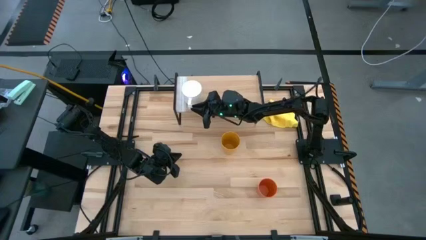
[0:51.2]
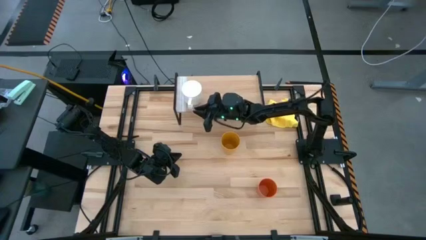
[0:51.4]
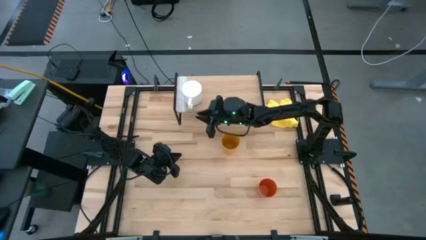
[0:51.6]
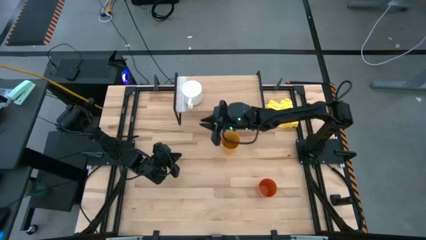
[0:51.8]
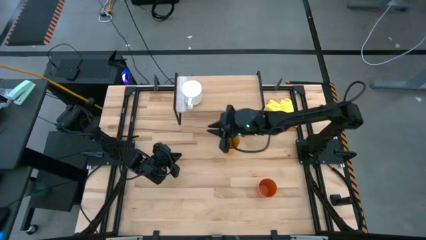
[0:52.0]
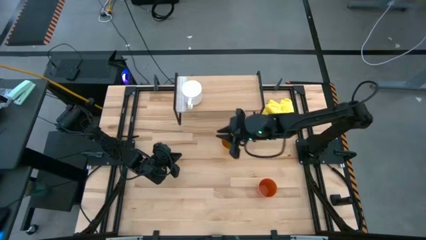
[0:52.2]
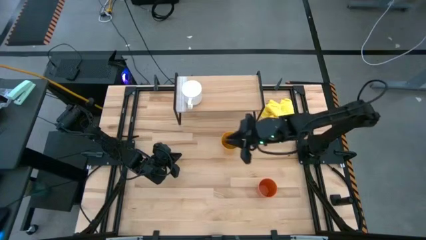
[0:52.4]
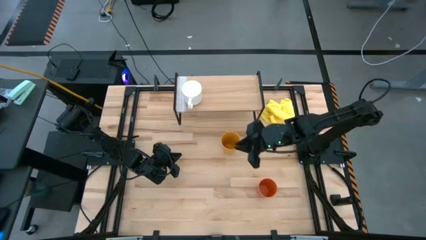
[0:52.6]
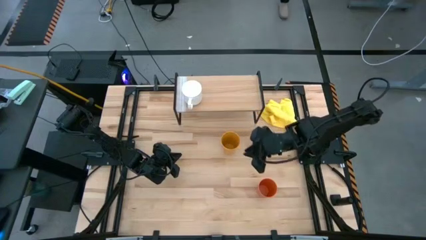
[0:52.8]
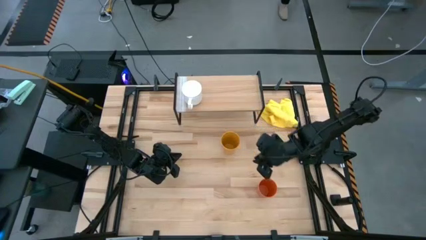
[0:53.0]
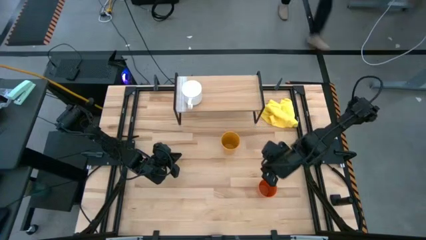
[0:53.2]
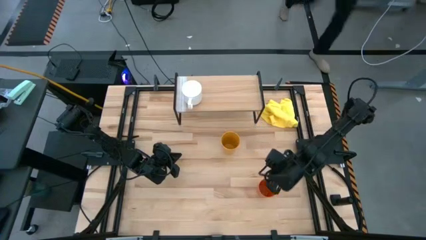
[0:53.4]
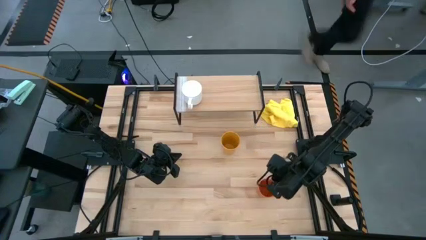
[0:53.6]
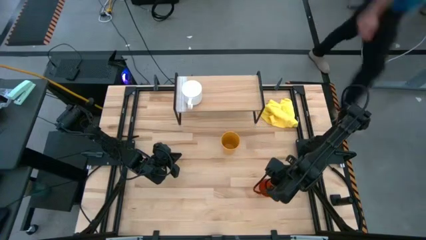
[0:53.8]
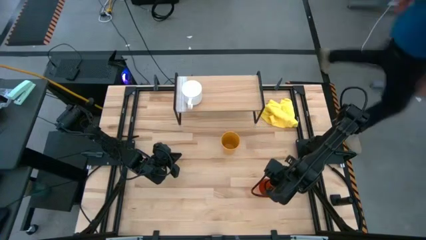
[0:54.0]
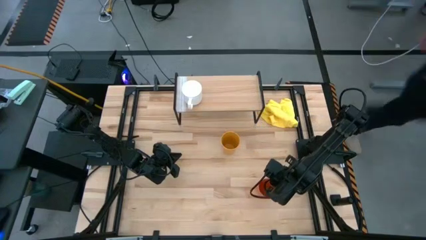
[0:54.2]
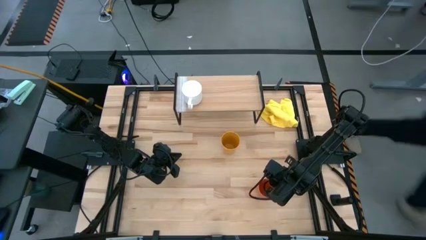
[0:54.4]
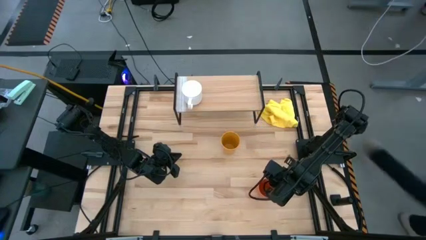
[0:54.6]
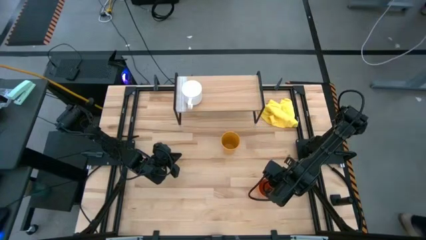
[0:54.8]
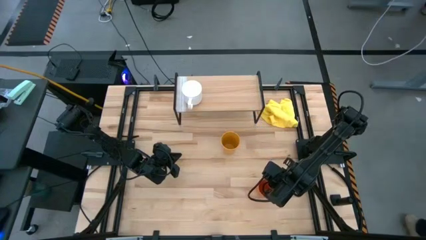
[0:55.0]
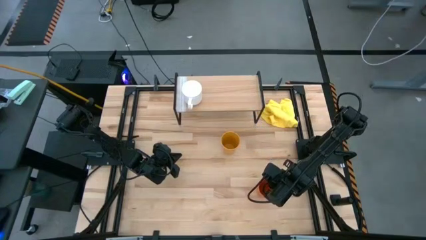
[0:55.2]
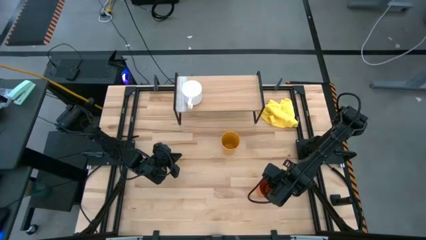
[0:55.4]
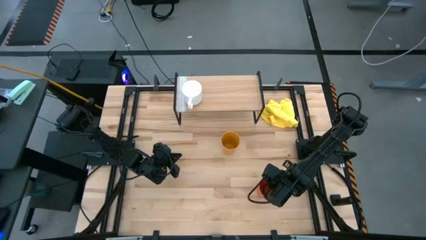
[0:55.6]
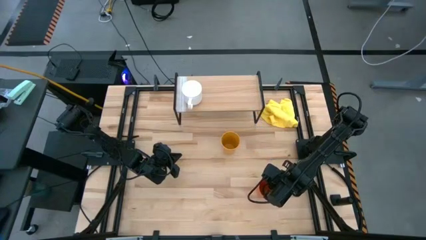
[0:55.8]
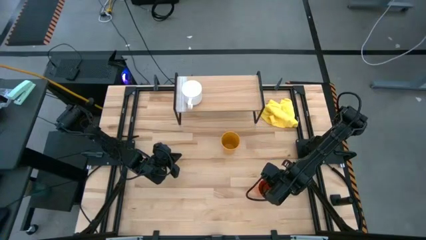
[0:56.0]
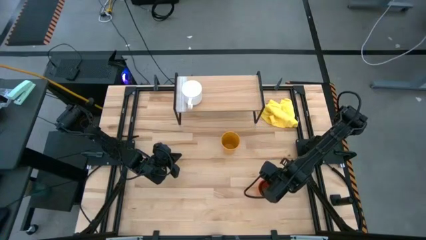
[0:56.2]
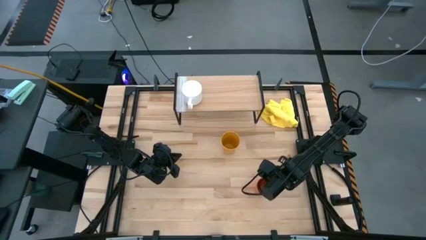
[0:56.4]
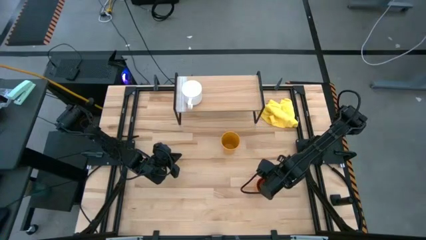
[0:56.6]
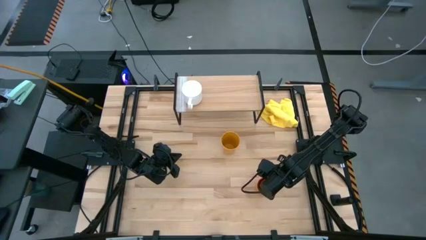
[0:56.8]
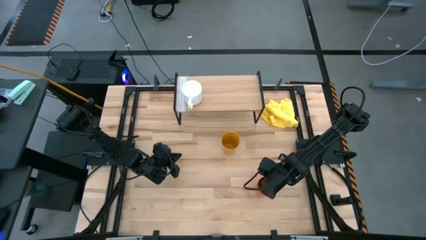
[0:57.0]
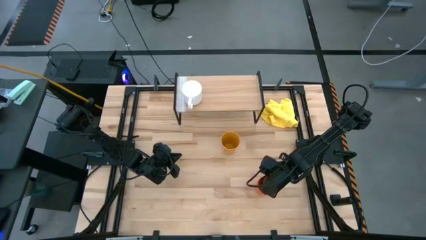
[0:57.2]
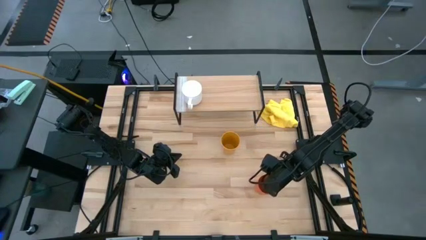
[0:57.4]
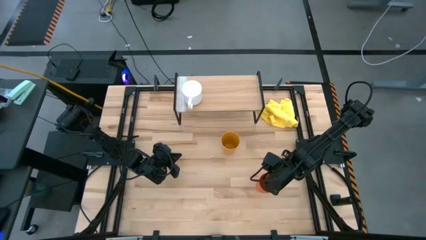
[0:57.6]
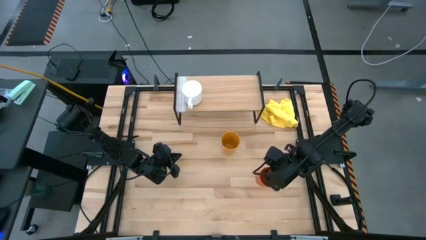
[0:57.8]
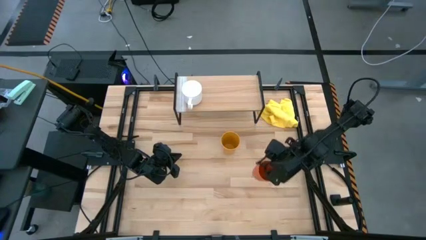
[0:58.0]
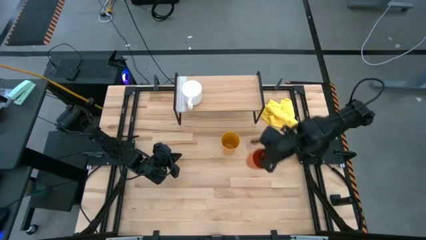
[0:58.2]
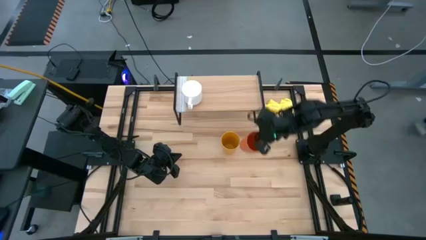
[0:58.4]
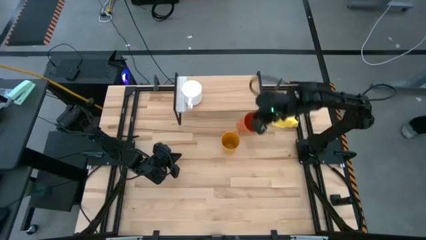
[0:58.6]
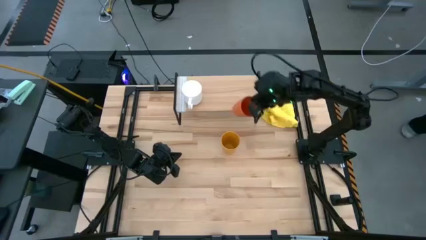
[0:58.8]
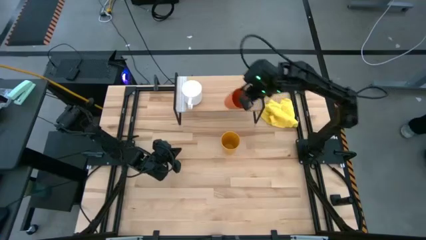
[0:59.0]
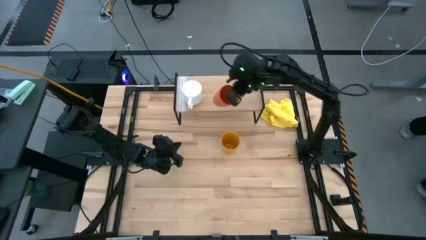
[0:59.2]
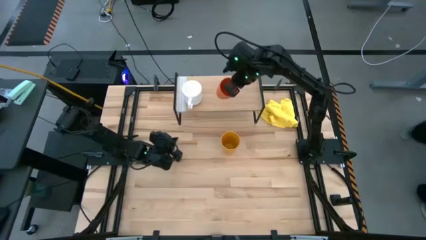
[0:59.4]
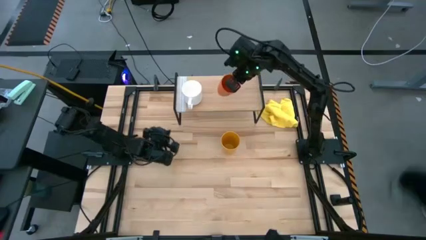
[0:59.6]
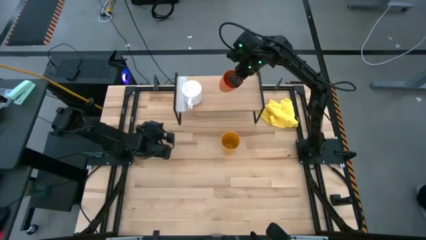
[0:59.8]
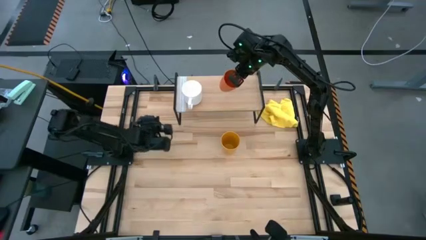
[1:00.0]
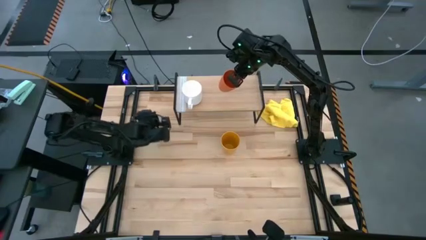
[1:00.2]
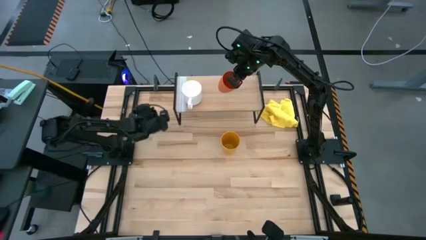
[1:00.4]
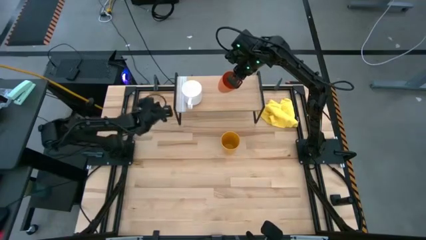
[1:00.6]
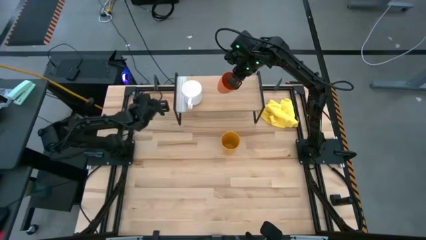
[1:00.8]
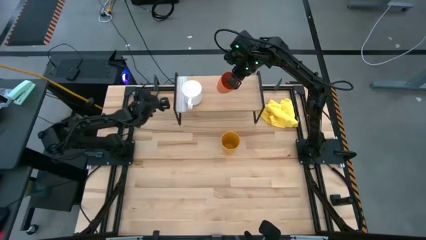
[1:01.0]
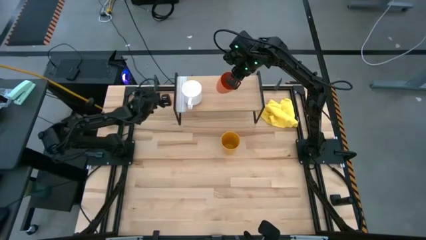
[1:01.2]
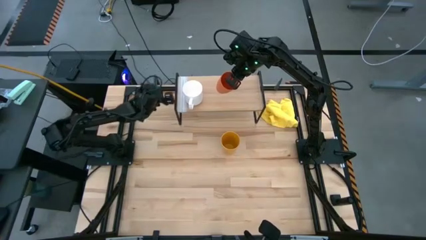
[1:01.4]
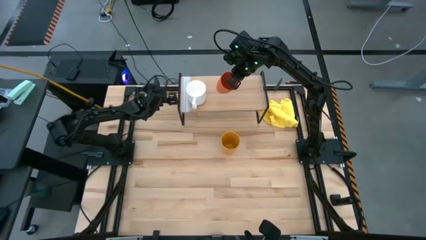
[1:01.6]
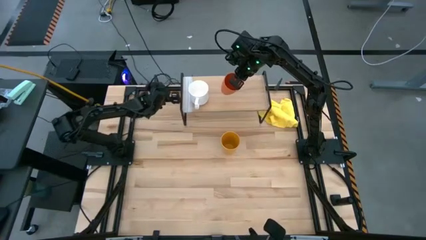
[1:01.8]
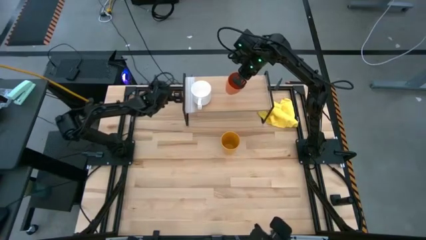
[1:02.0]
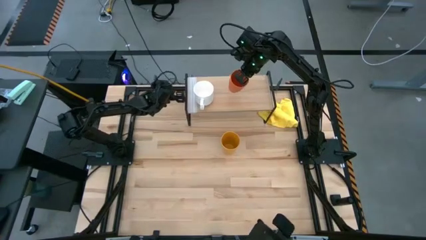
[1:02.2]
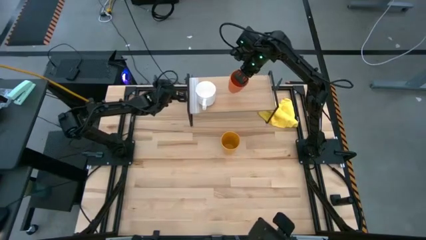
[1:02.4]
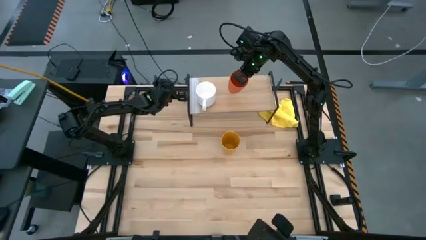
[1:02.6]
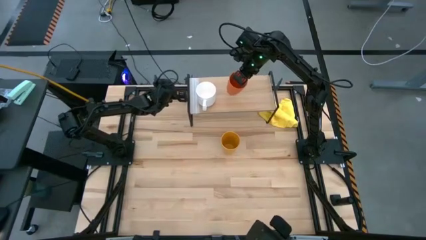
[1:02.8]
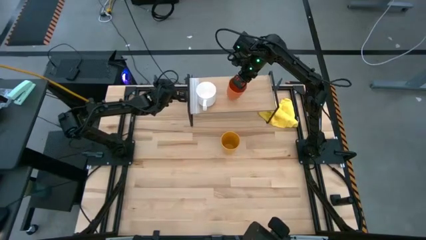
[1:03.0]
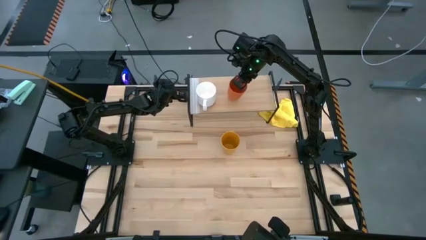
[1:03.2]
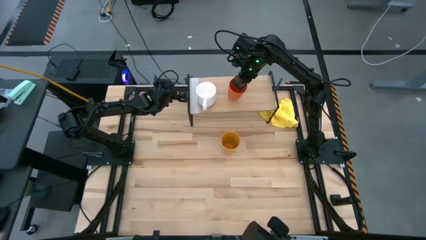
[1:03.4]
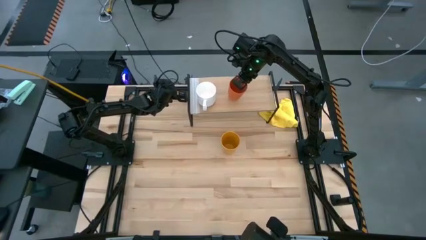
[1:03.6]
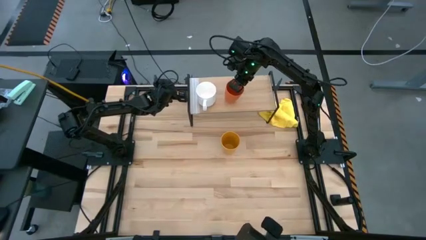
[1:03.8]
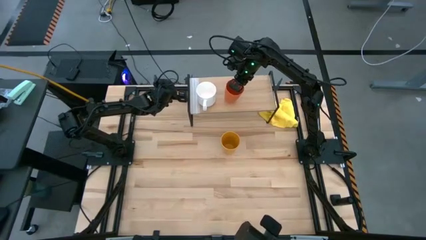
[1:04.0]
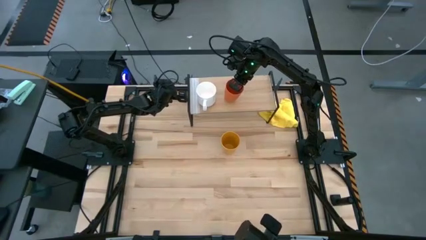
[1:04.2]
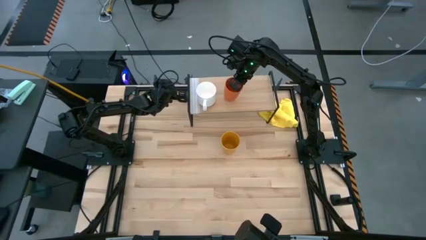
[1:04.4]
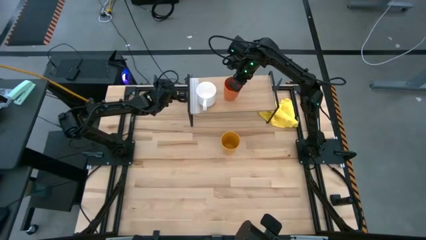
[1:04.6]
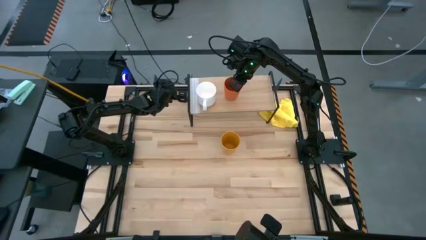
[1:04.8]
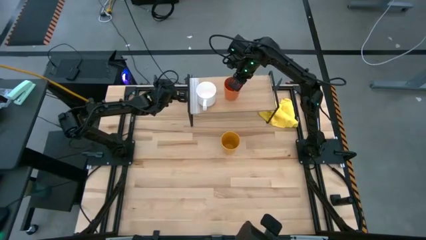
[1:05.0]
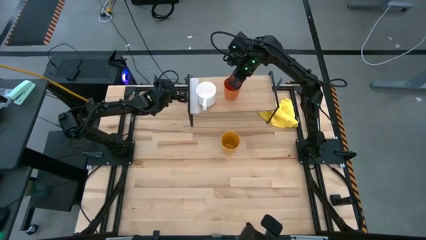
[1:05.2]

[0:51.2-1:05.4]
Task: Stack small to large cups/mugs on shelf
Put the orange cup on the shelf

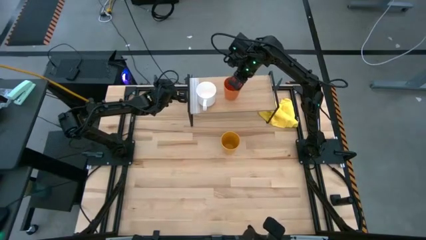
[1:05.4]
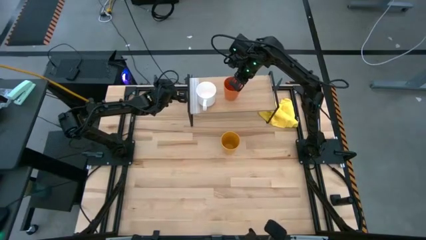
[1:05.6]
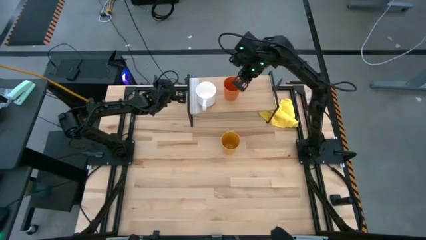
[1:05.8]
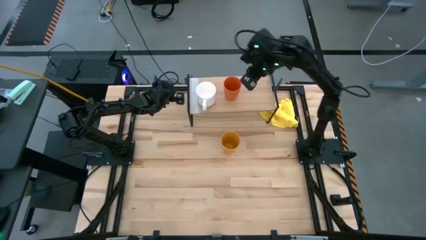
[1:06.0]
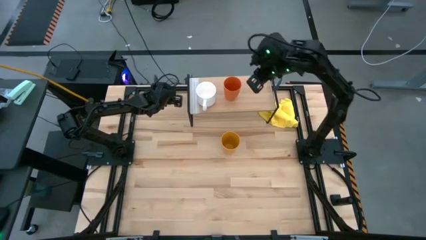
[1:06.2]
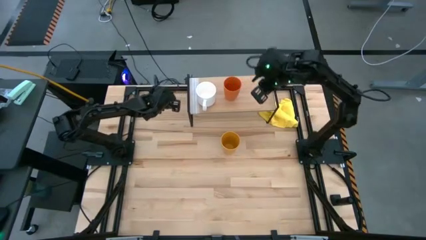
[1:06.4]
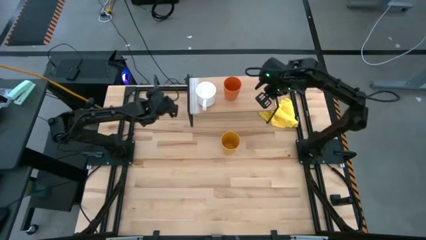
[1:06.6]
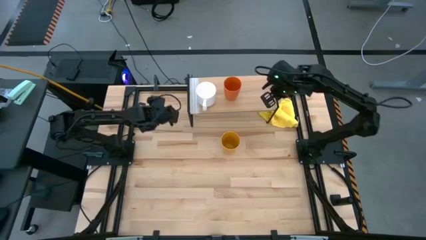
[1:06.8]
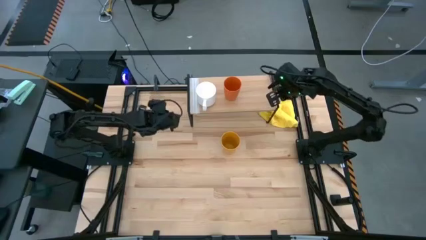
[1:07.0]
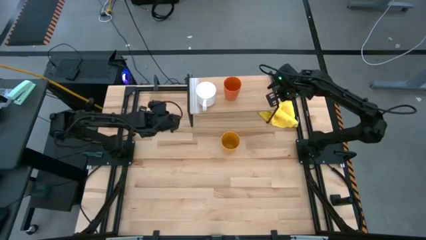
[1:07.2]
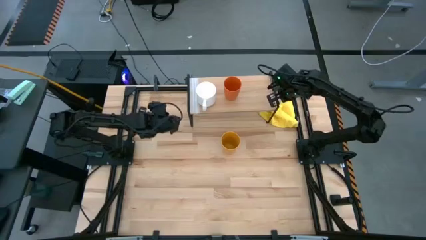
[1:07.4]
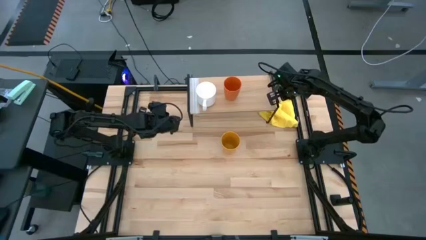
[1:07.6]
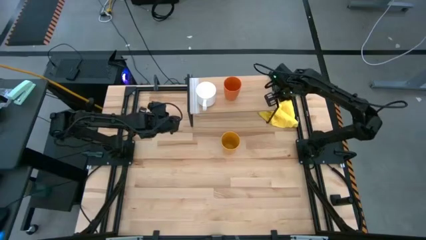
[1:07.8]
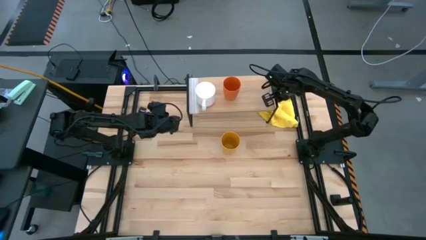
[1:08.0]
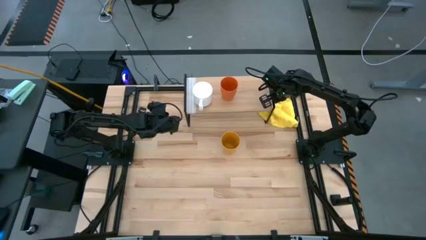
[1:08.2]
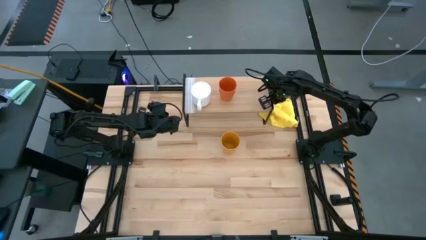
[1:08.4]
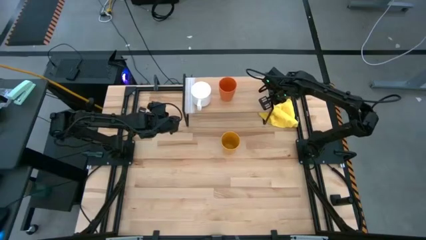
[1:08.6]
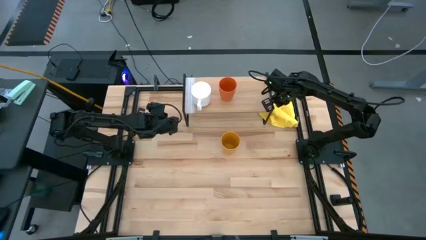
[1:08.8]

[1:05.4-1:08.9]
Adjust the shelf
